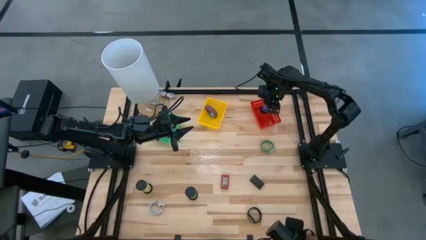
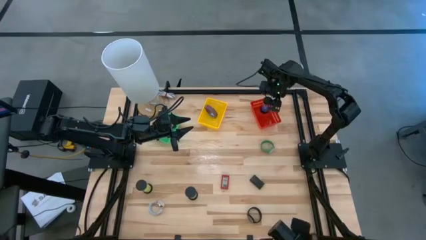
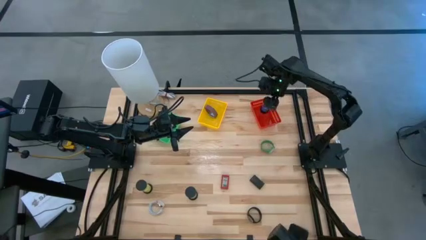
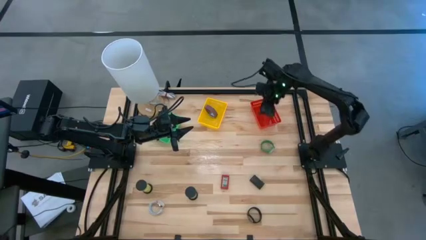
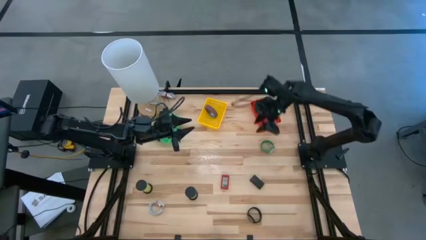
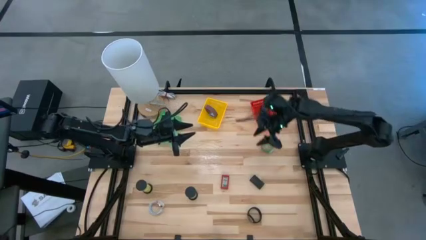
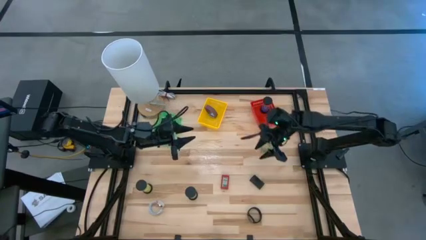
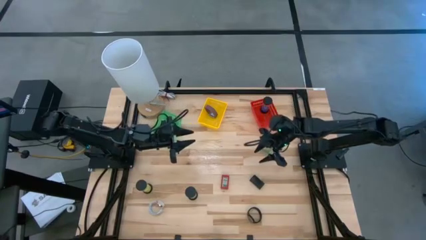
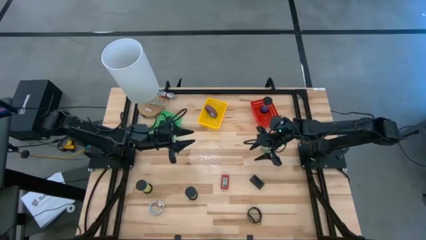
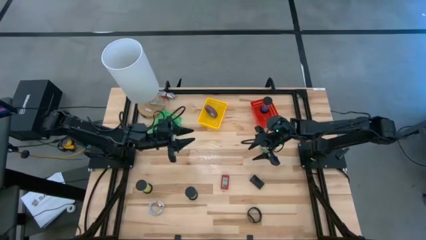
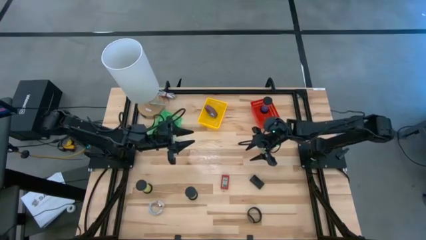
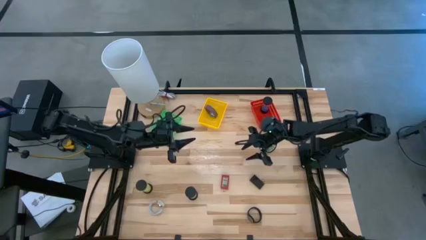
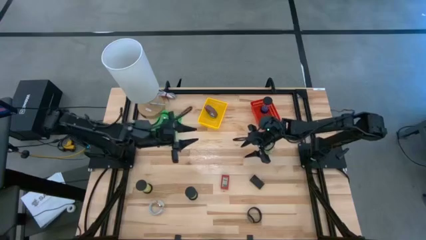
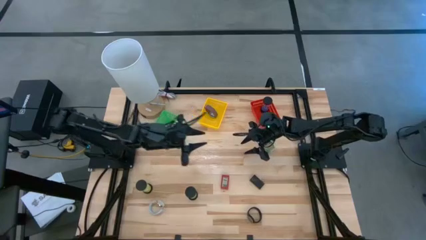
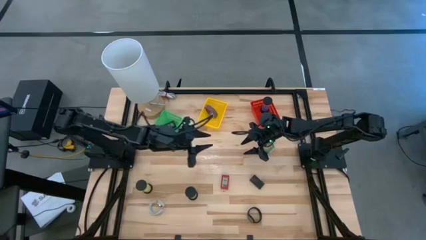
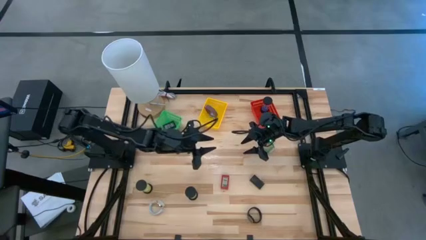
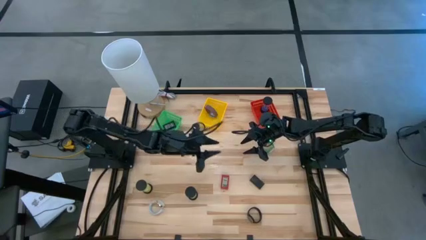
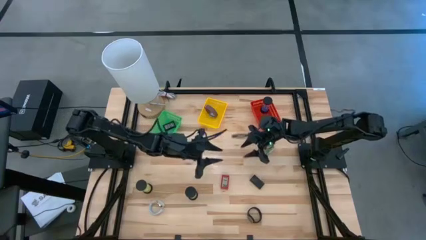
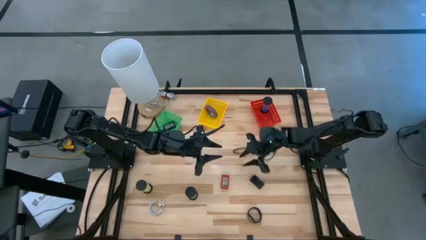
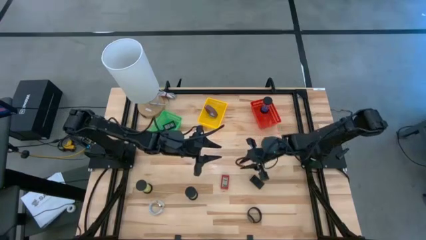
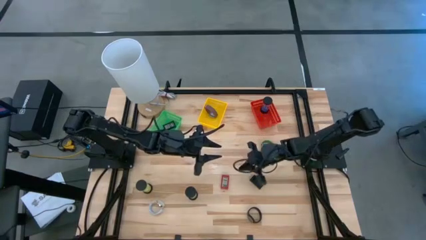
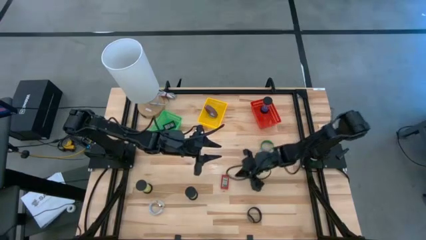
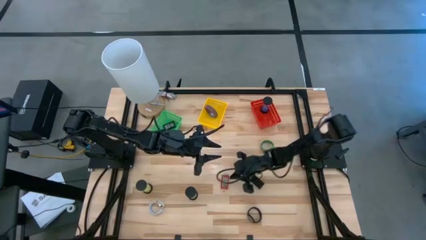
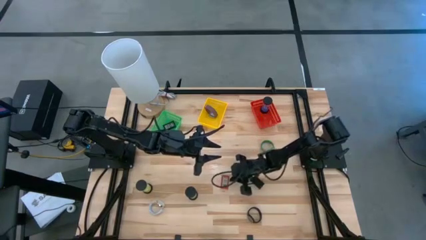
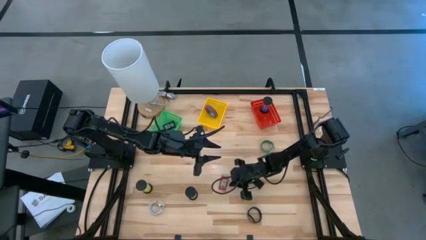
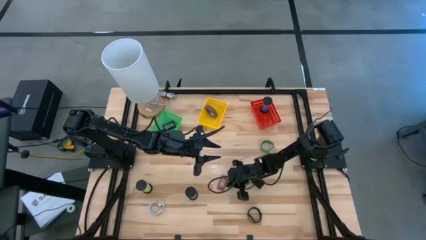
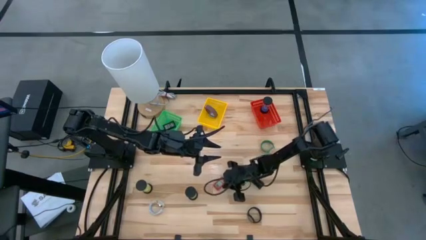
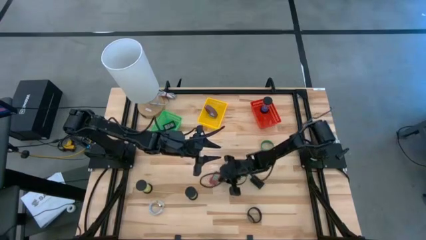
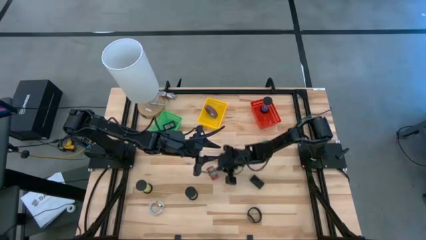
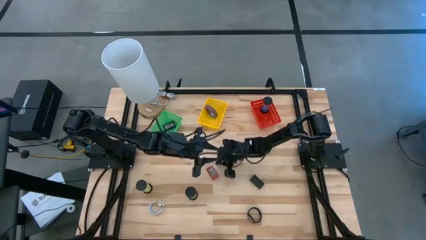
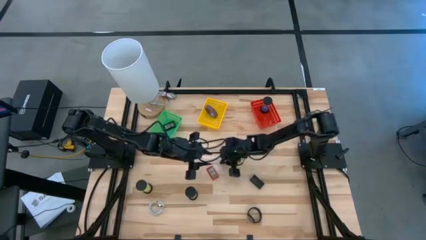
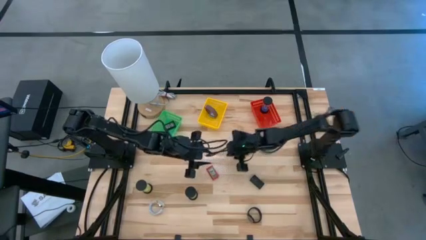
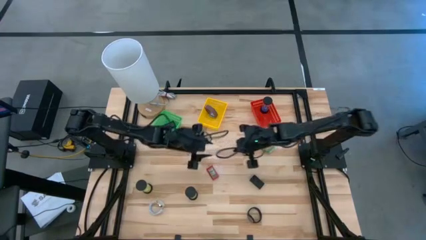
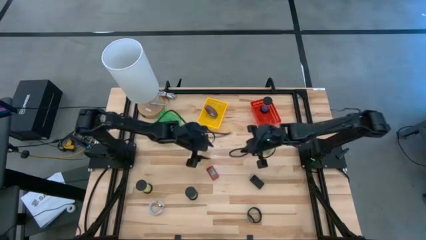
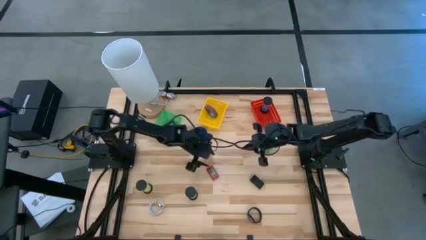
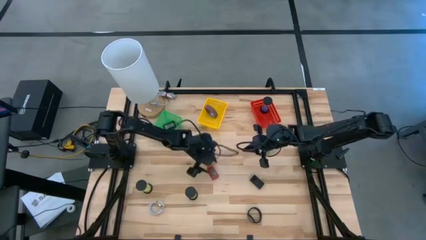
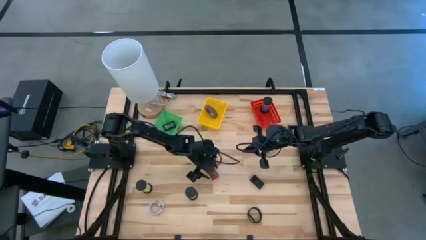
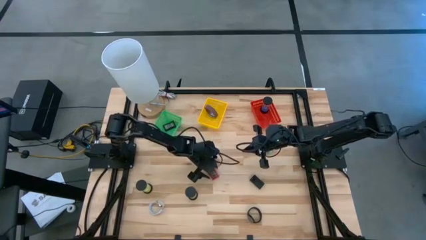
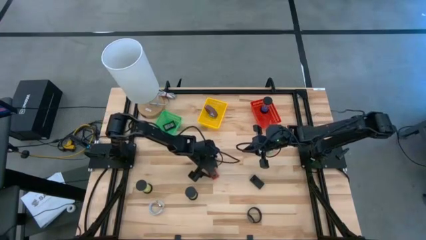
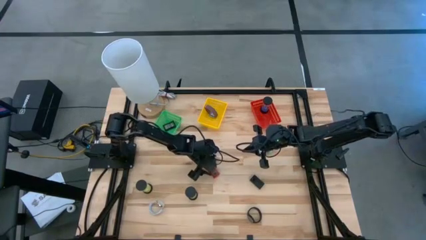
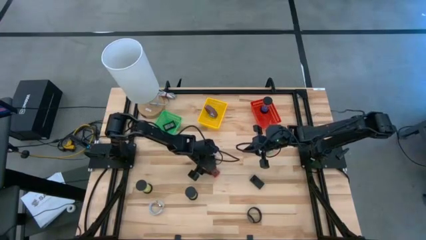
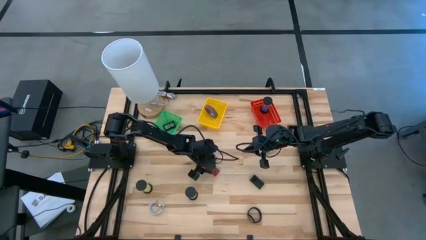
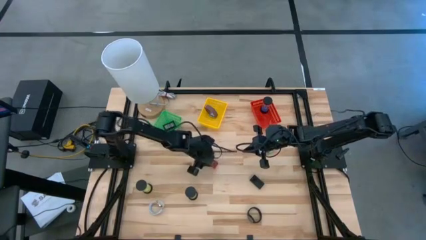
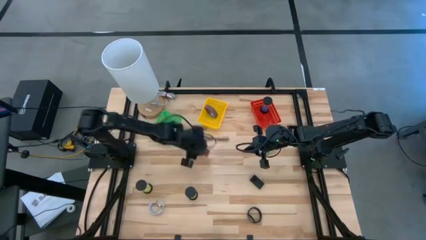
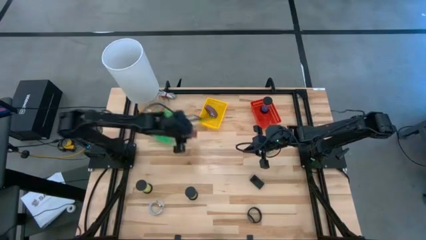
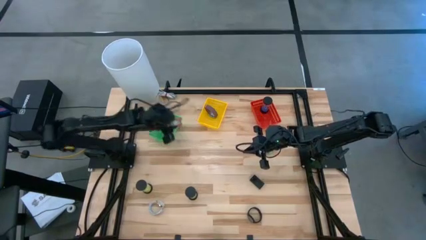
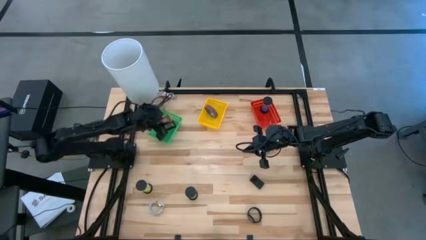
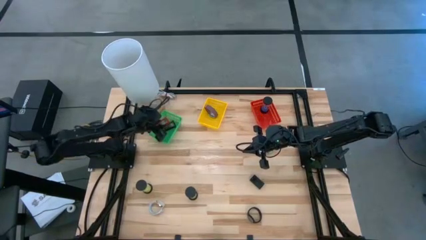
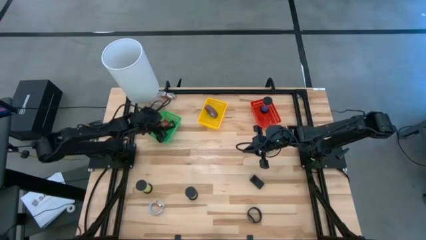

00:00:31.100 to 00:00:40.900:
Task: Pick & Place Office items
Put the red timer into the green bin

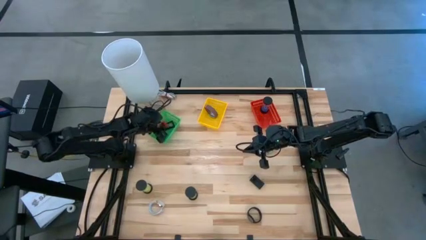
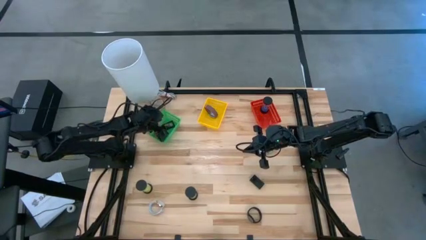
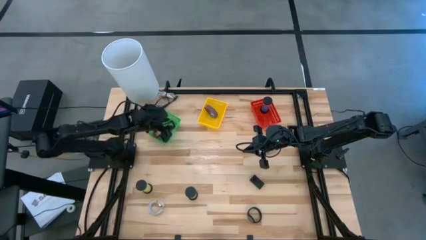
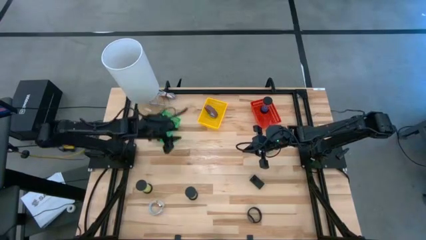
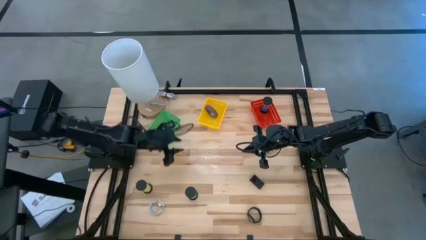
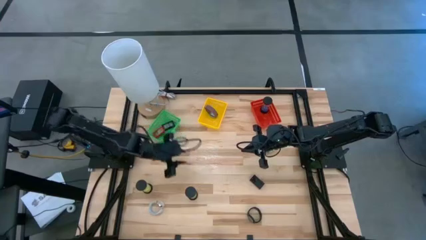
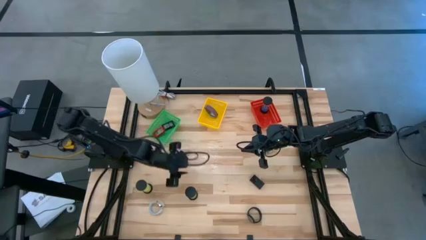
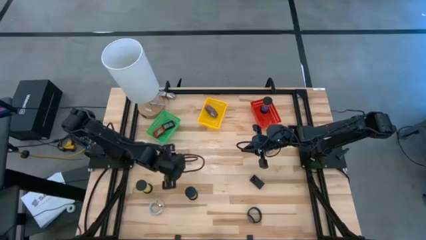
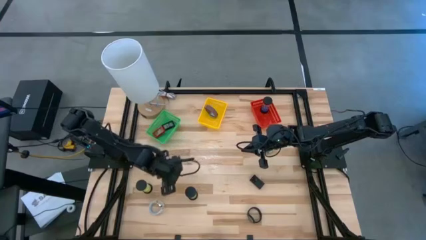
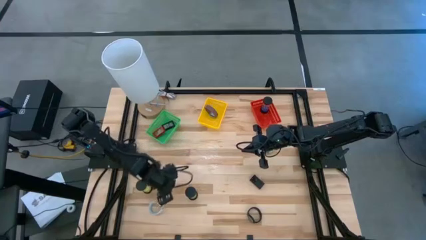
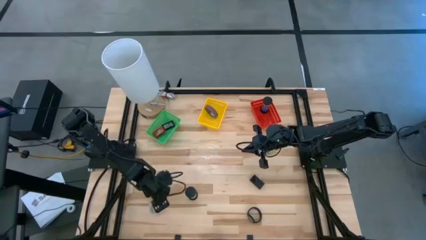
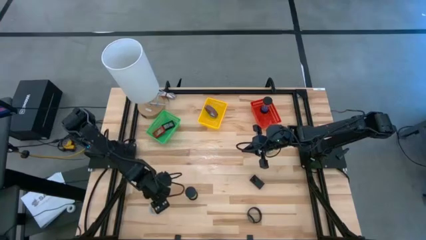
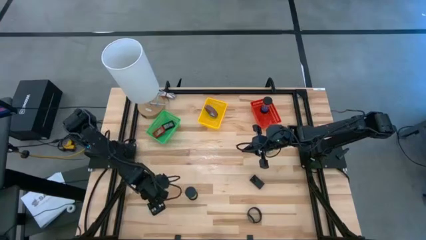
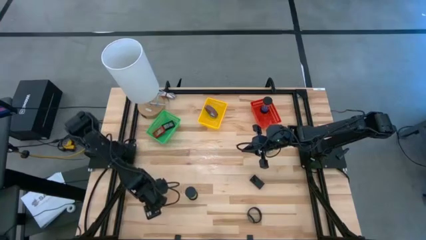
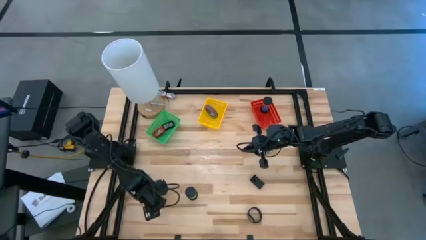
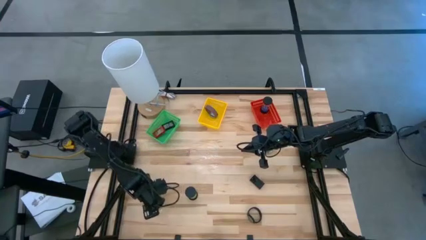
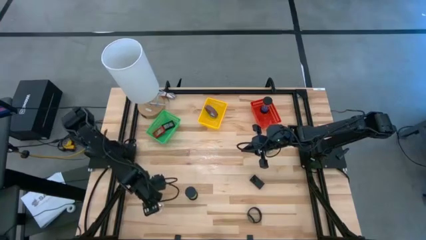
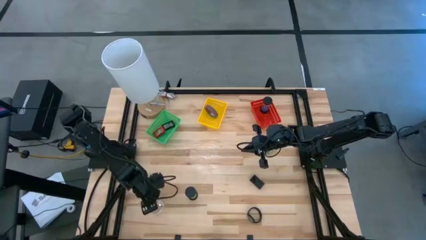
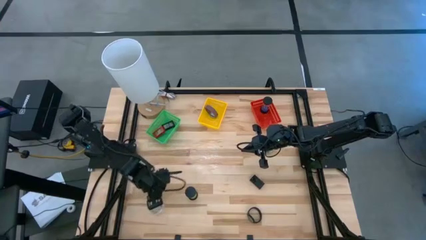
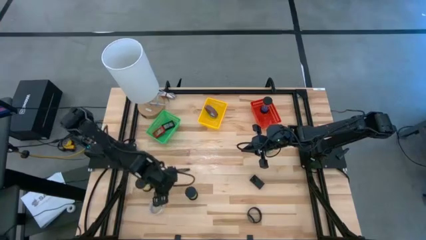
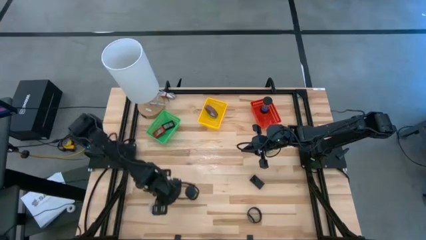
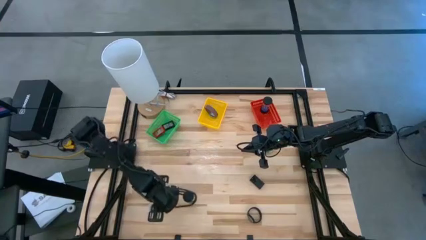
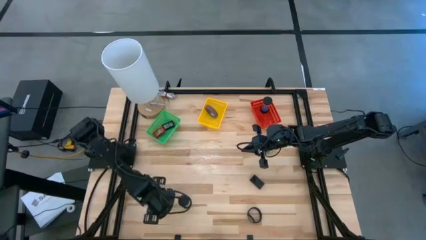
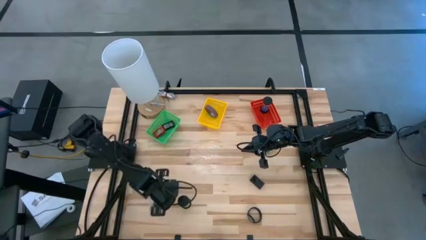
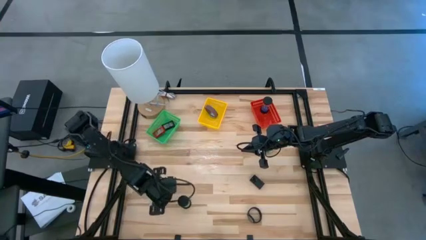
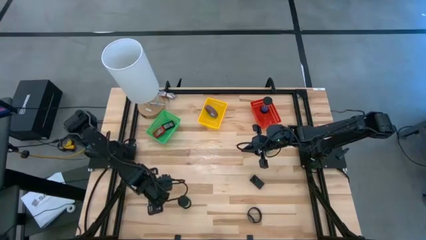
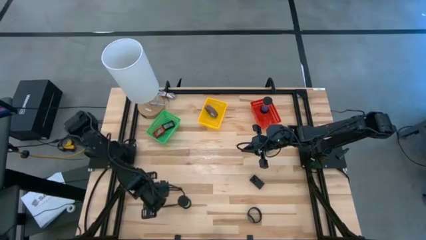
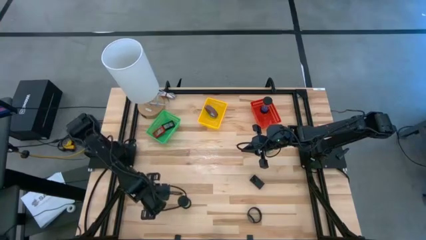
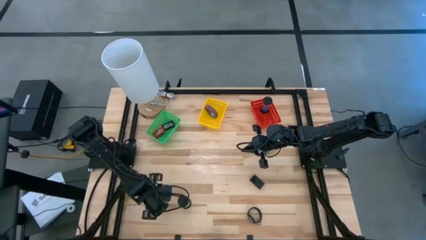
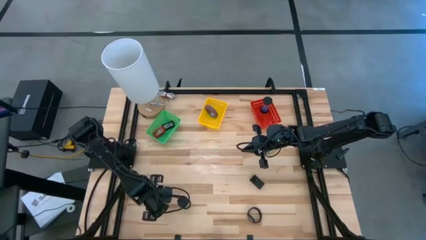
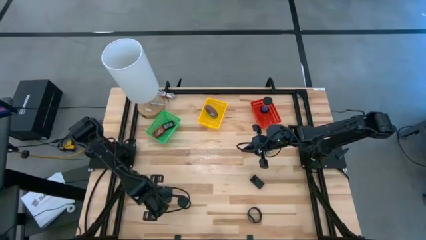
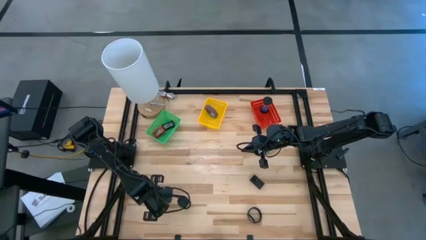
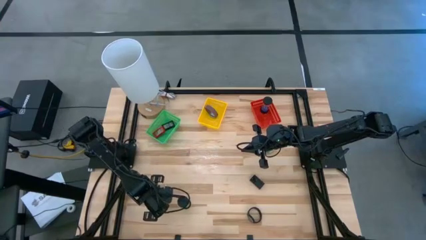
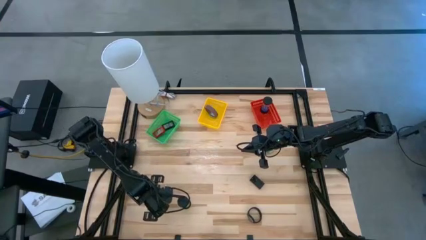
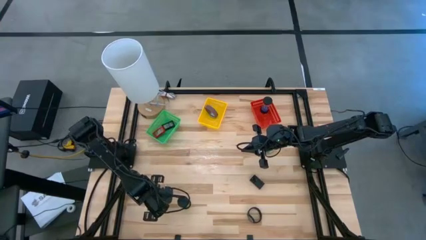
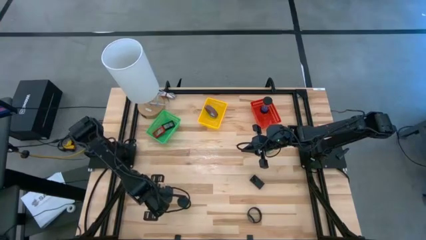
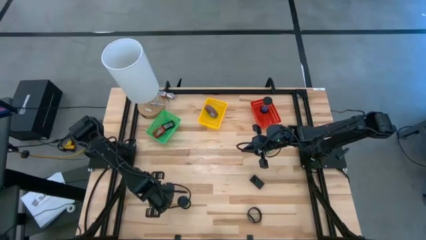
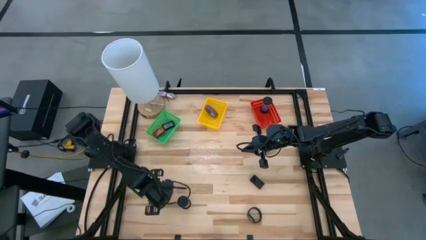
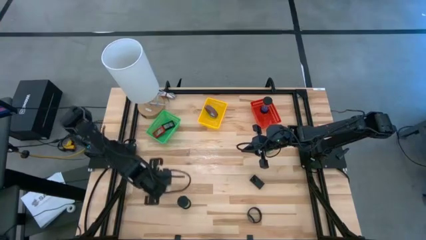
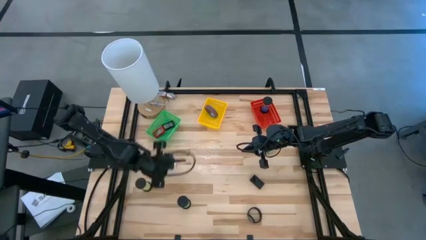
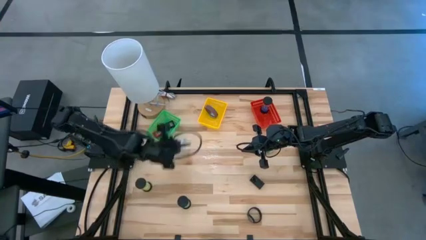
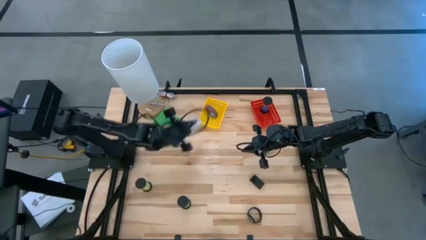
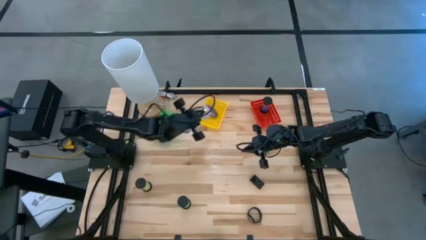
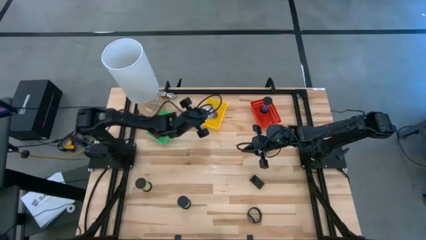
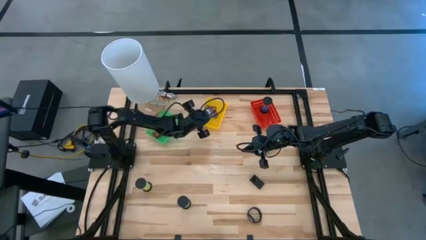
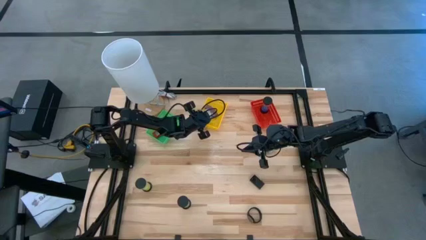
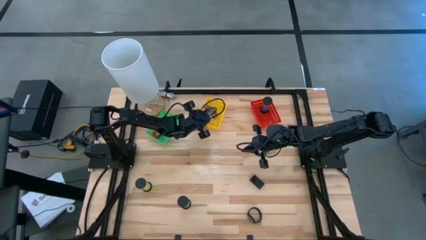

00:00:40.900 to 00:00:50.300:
Put the white watch into the yellow bin
